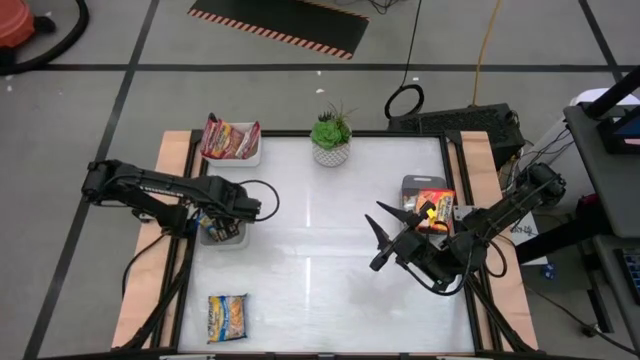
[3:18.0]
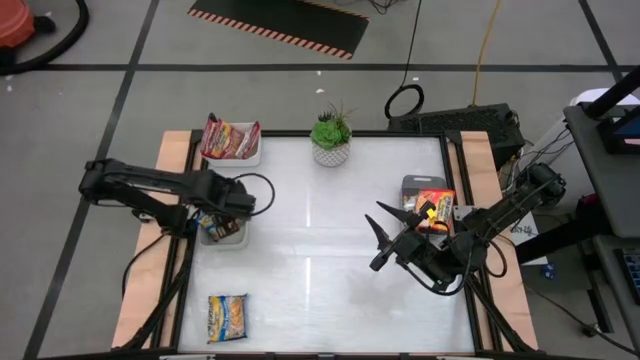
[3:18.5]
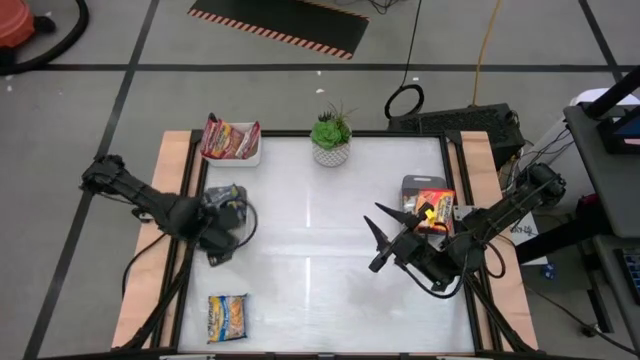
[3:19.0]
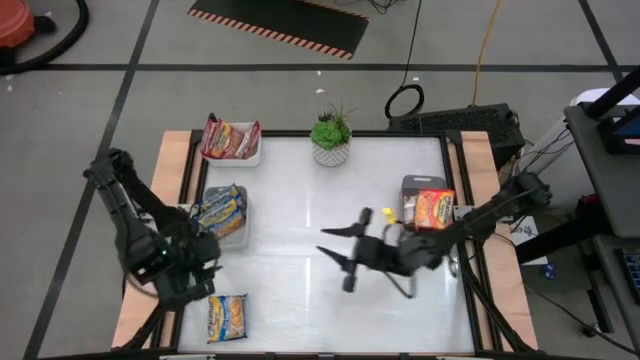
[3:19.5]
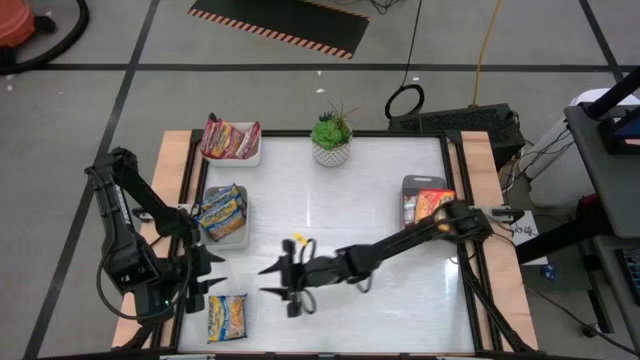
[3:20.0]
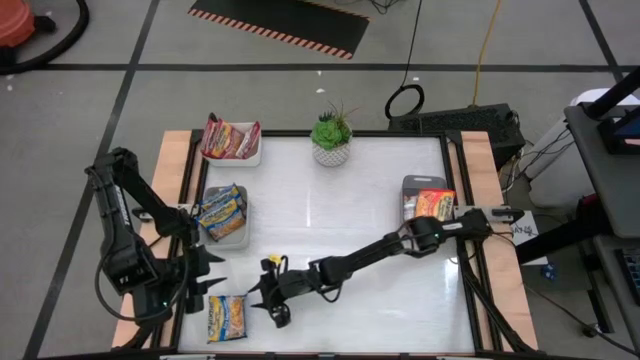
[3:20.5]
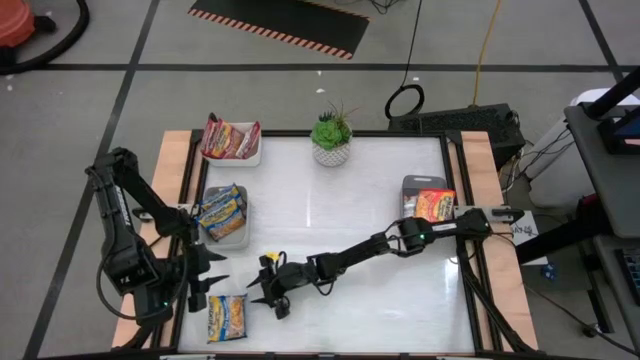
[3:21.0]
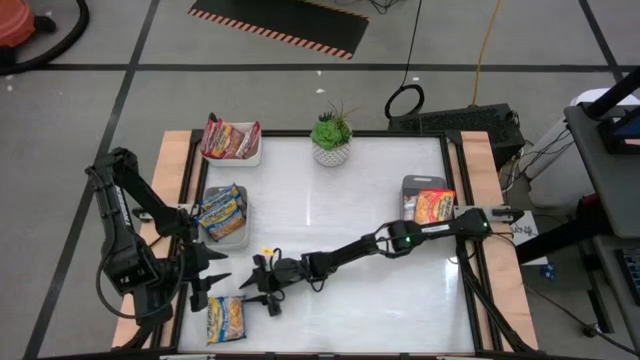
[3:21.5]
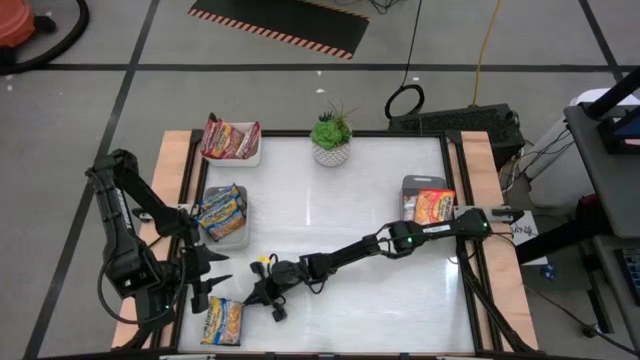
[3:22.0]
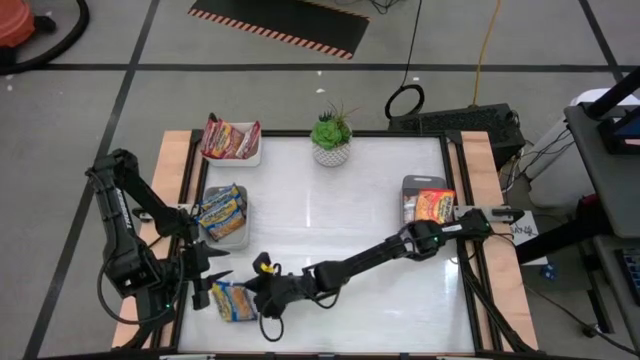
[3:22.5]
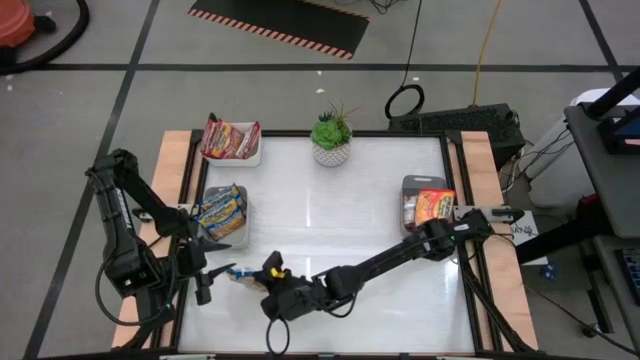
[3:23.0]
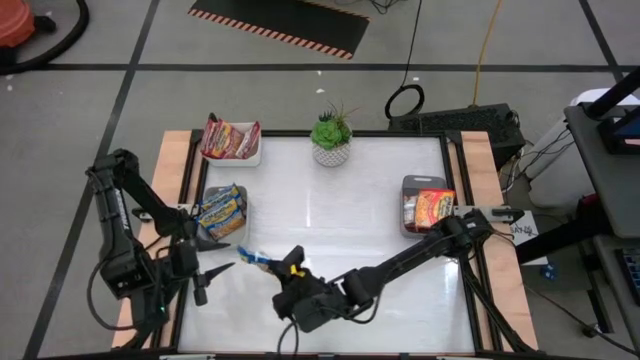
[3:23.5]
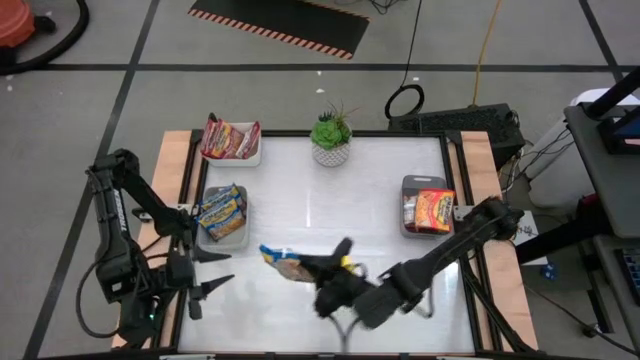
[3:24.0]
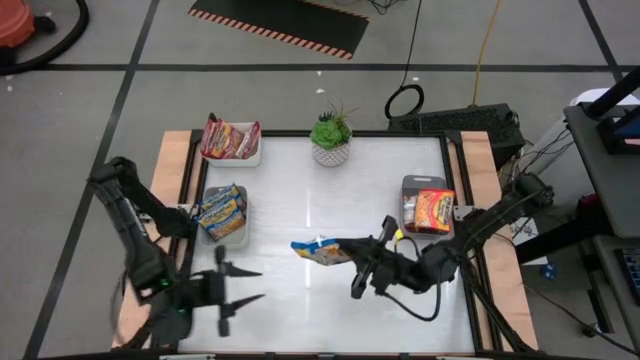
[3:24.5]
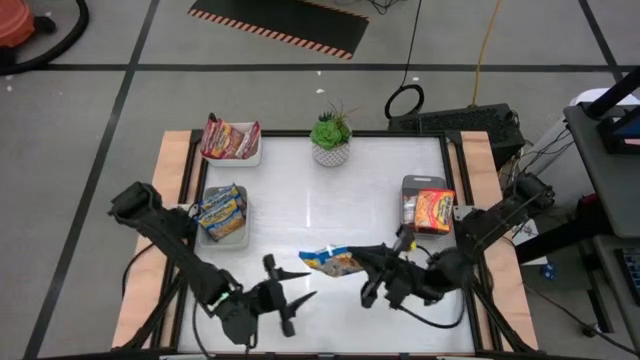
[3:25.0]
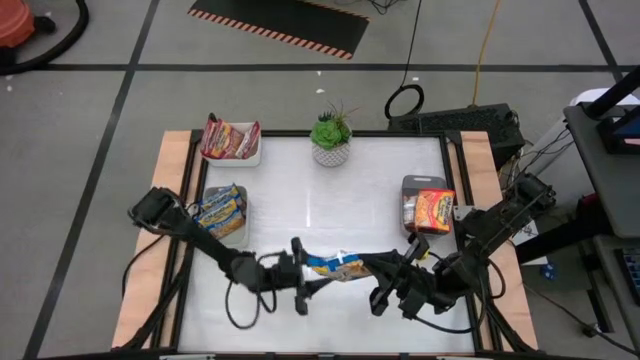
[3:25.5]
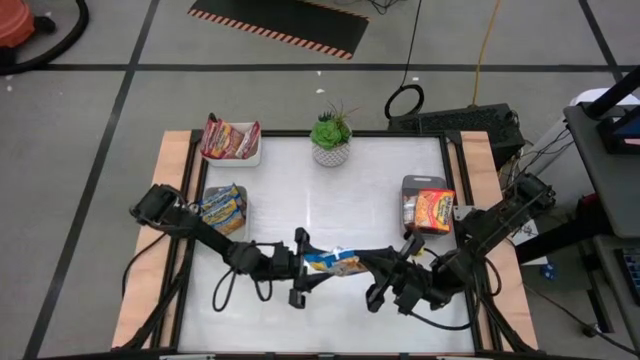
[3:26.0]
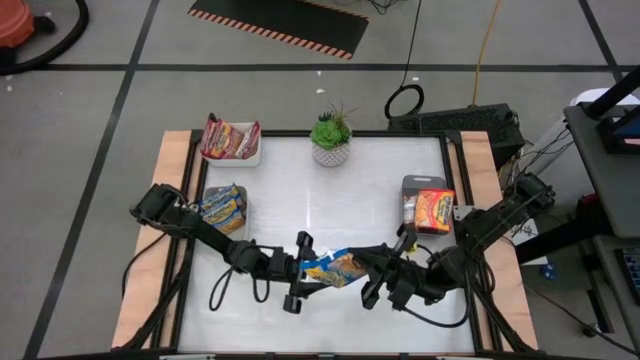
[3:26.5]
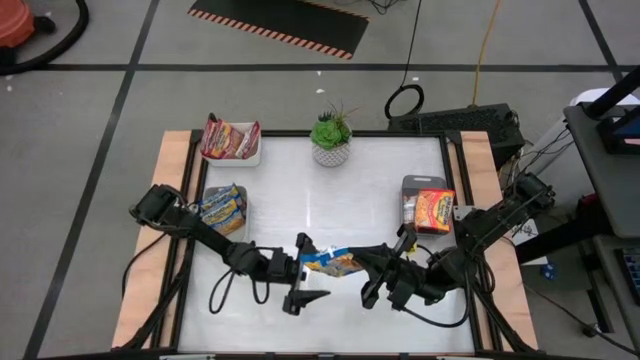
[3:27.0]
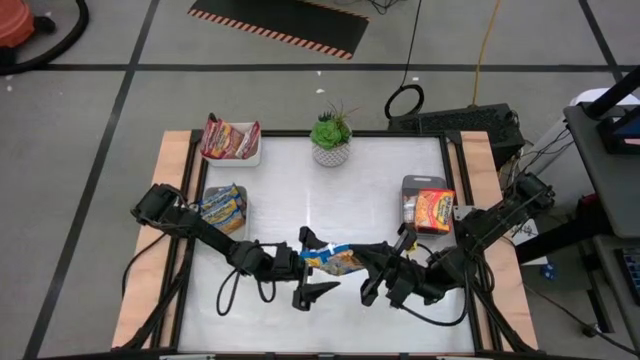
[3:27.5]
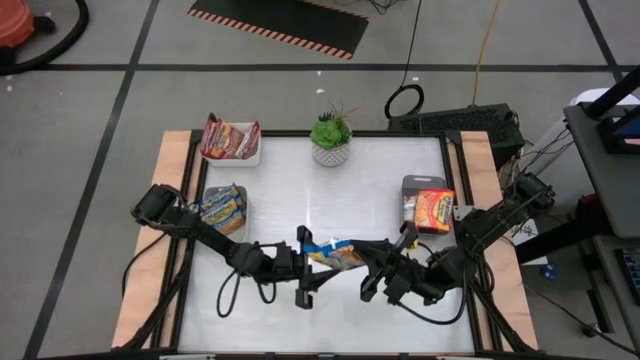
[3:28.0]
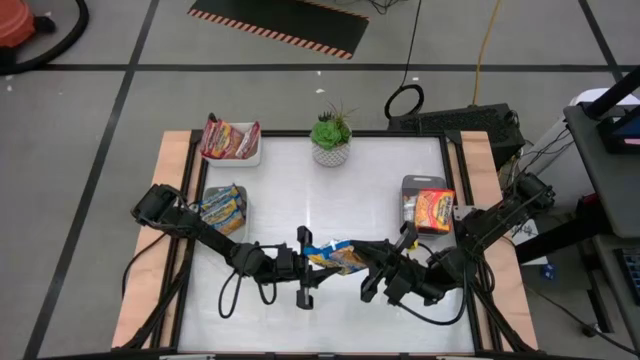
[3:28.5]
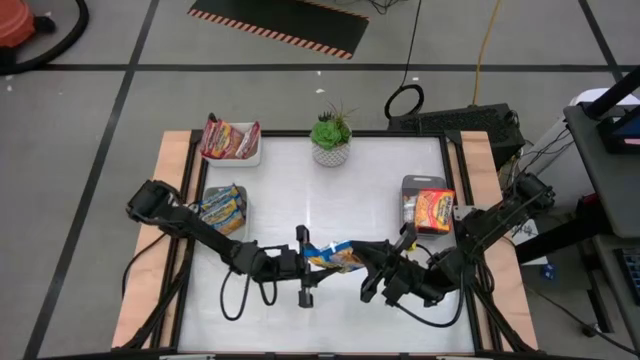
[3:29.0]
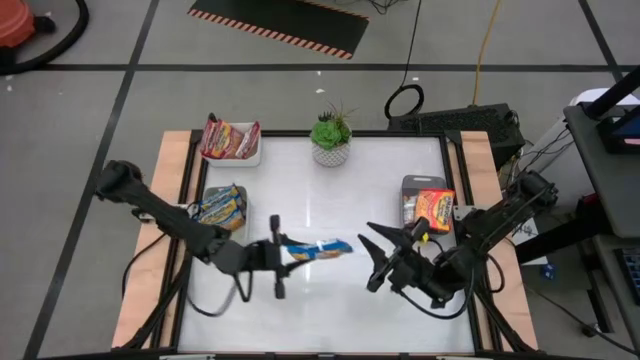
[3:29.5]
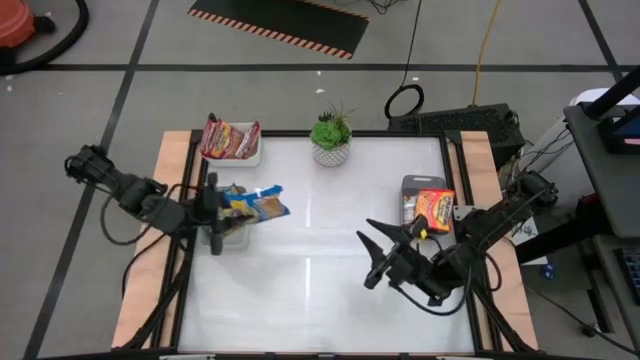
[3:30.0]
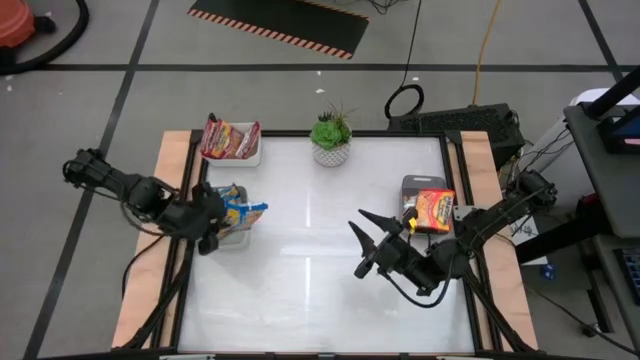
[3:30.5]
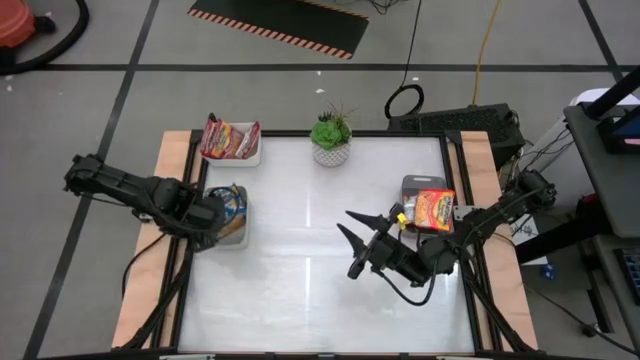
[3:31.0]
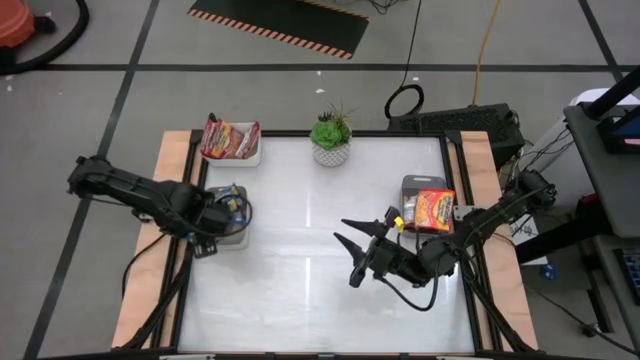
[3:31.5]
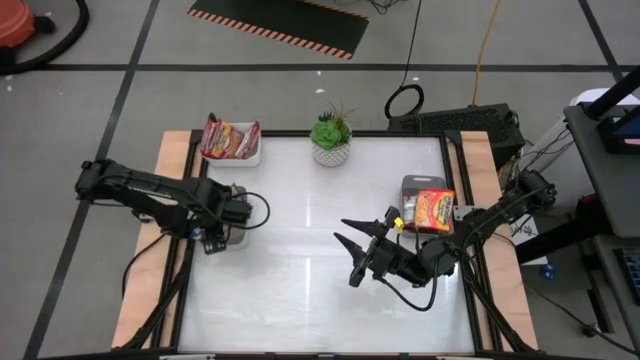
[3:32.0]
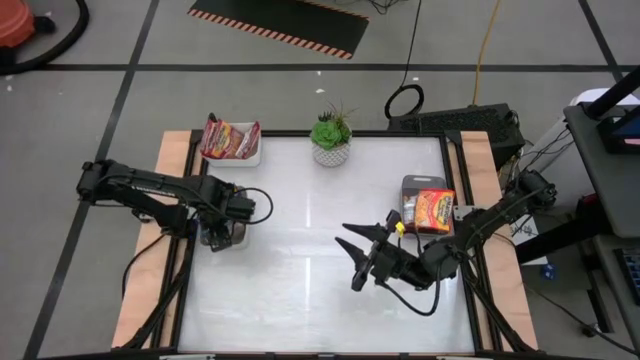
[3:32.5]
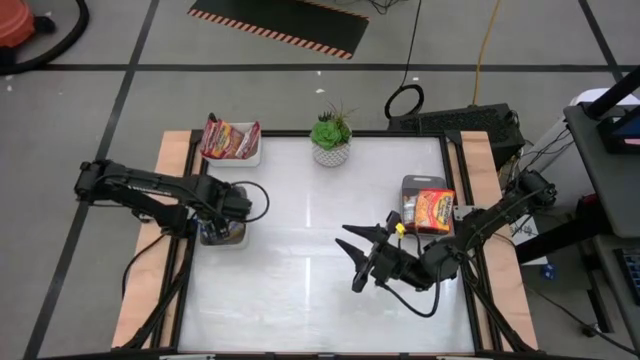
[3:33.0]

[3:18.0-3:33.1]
Task: Sort Maruchan noodles
Put the blue noodle pack into the gray bin

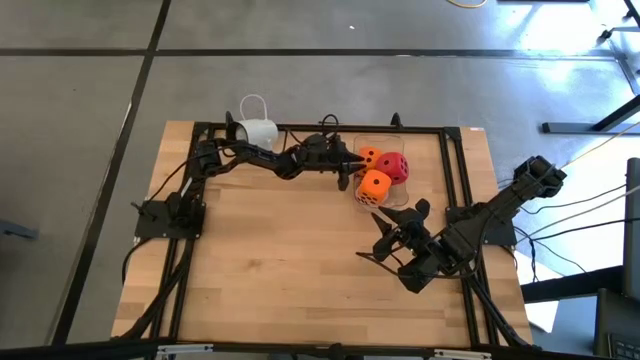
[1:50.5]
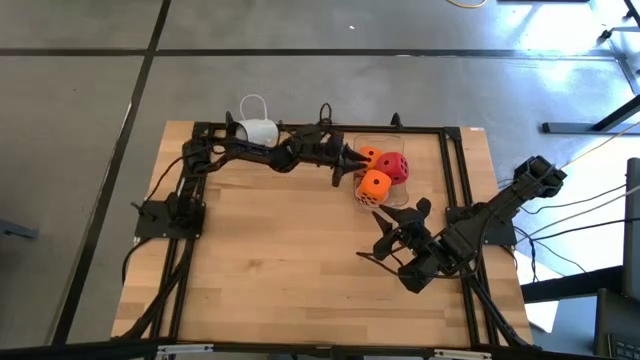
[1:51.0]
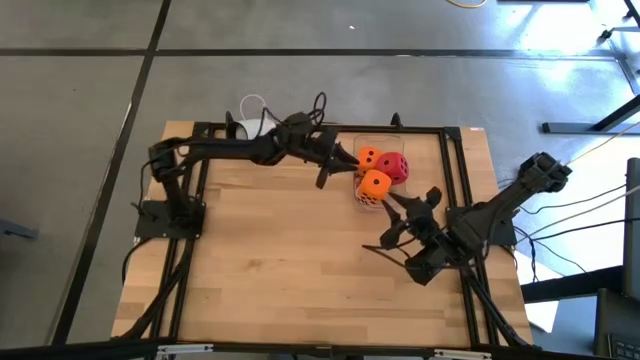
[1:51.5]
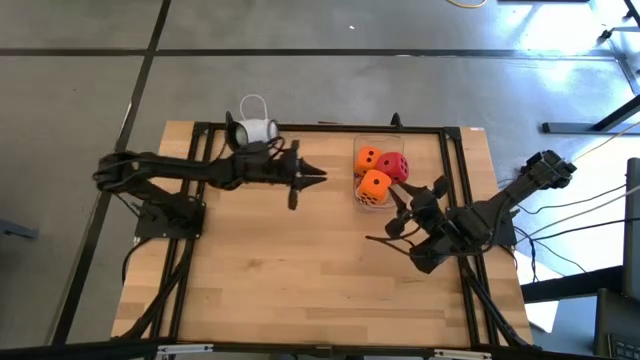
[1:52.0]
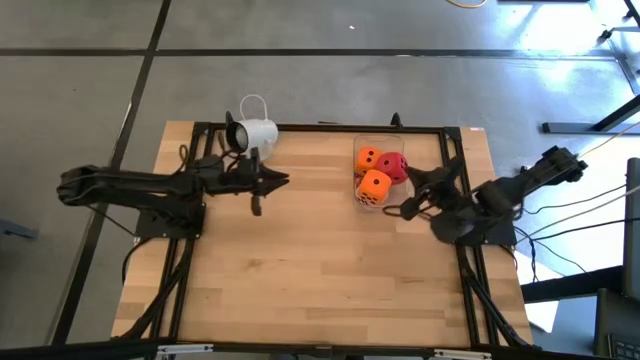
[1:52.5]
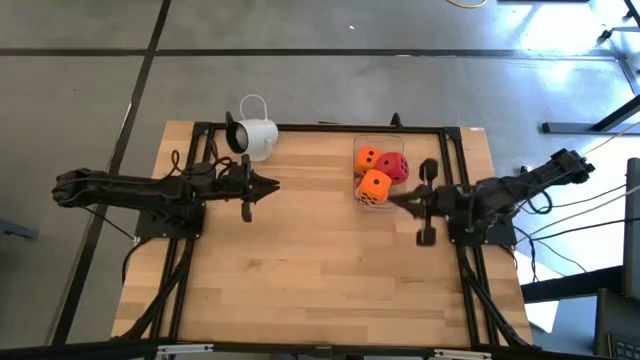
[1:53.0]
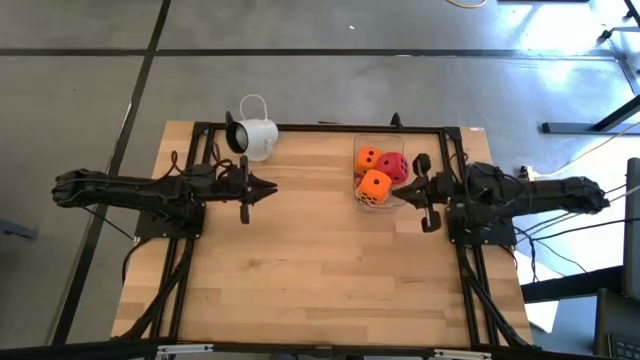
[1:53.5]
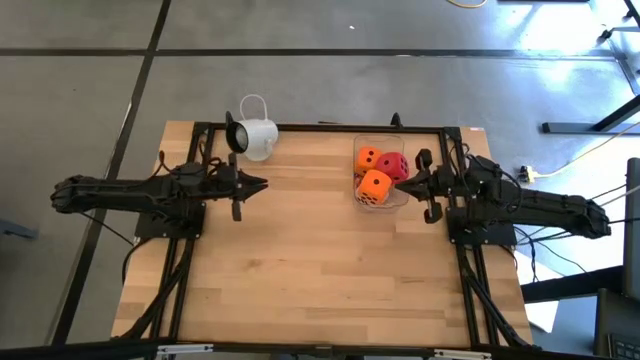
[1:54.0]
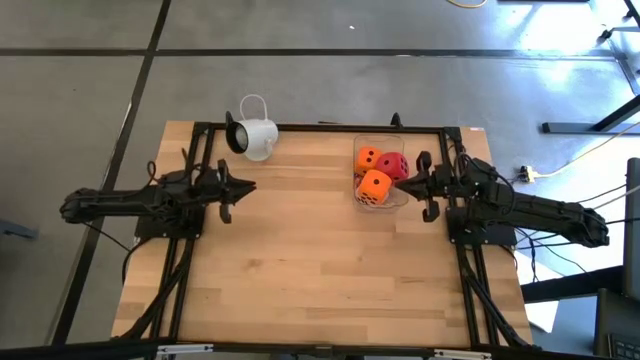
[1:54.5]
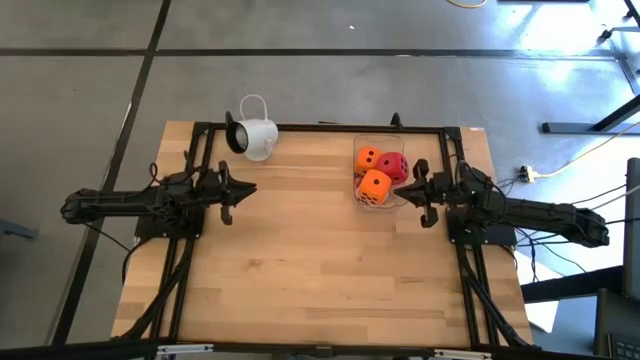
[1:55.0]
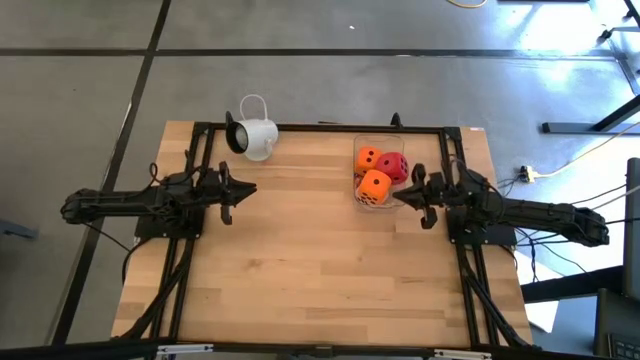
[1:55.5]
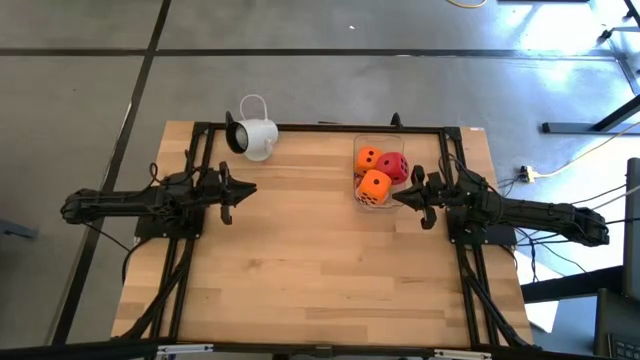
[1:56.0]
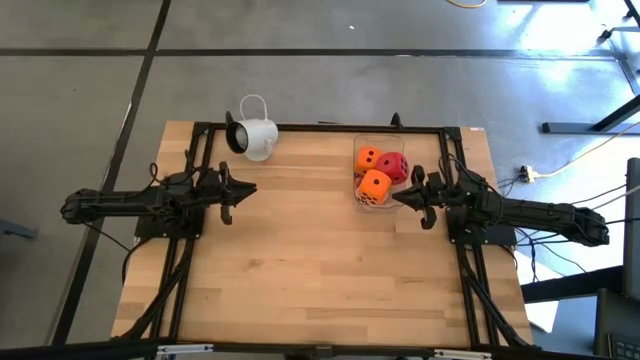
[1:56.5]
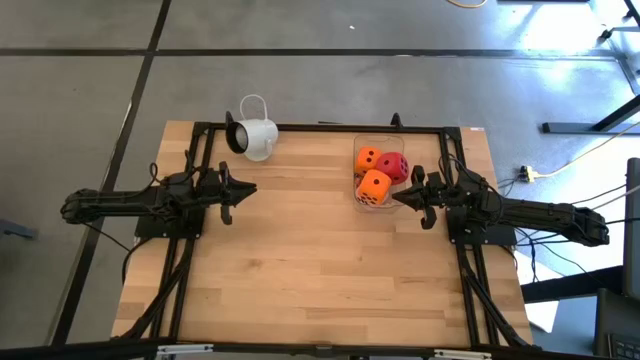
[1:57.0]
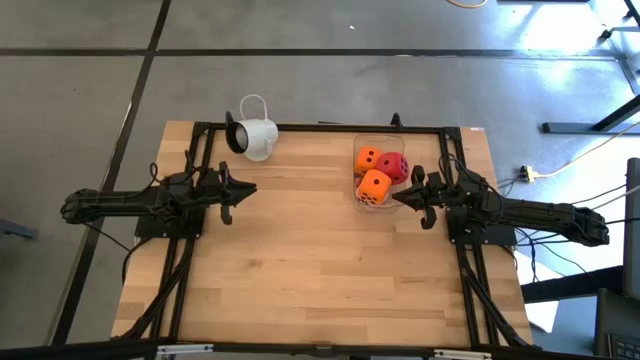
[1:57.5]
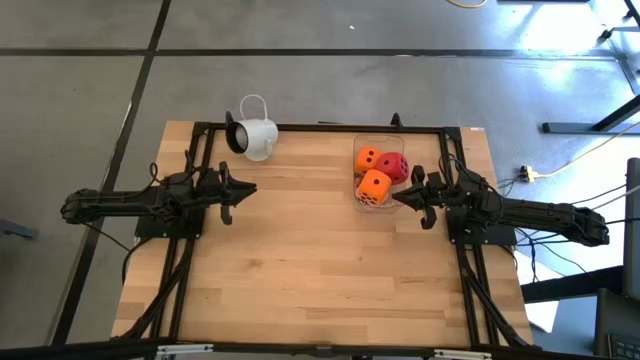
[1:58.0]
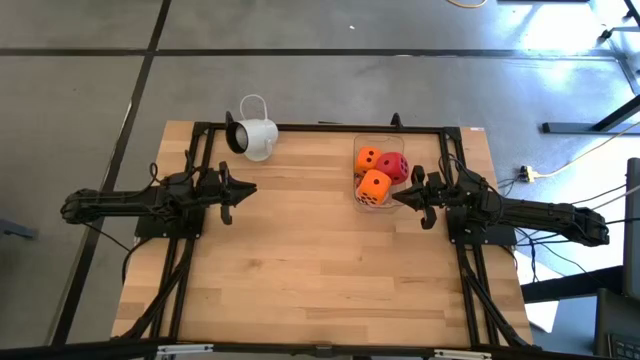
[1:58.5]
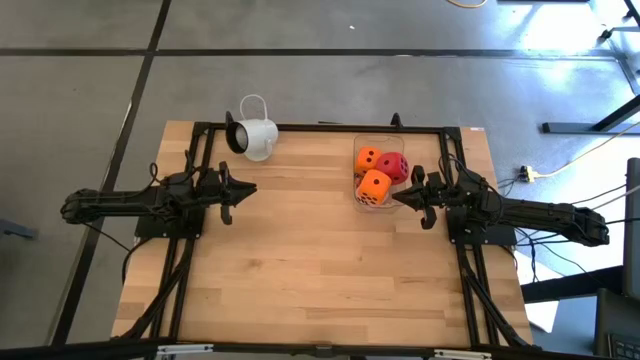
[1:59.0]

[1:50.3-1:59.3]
Task: Pick & Place Dice
Return to Home Position
